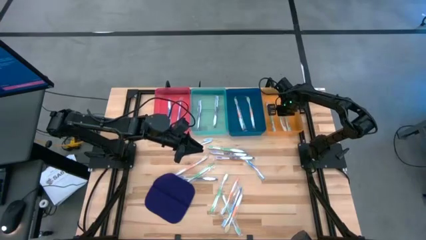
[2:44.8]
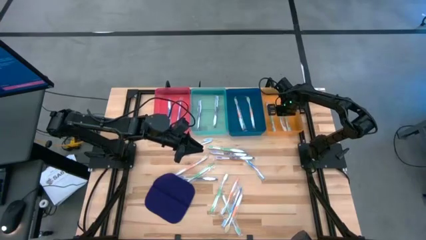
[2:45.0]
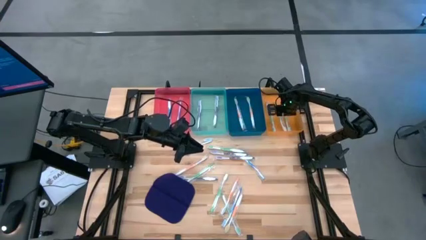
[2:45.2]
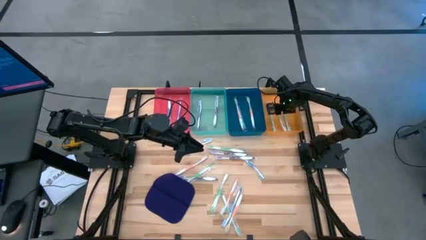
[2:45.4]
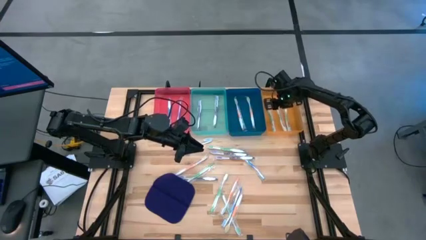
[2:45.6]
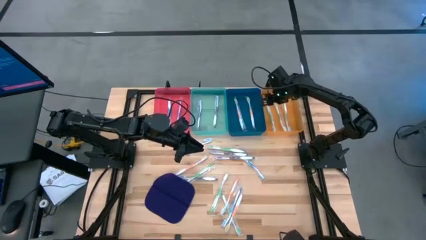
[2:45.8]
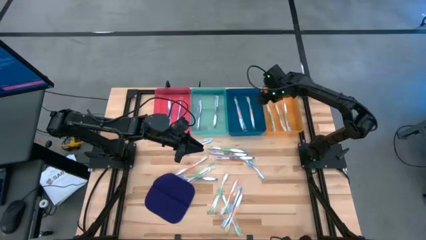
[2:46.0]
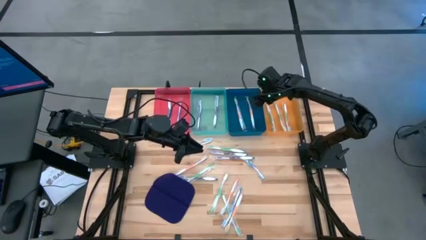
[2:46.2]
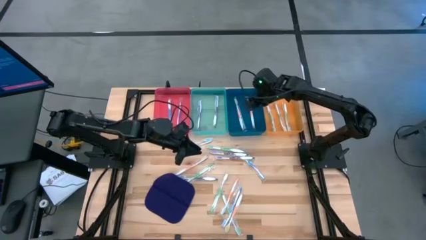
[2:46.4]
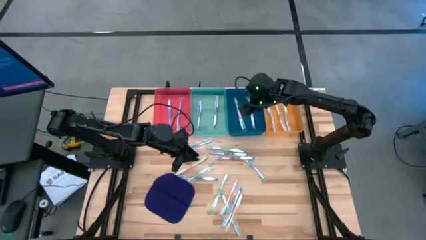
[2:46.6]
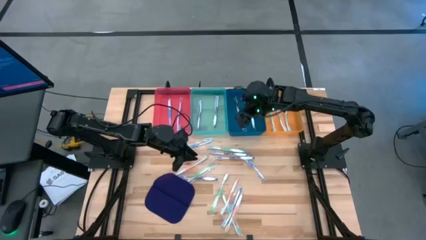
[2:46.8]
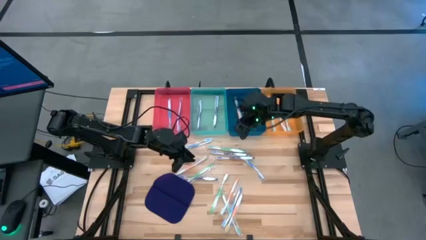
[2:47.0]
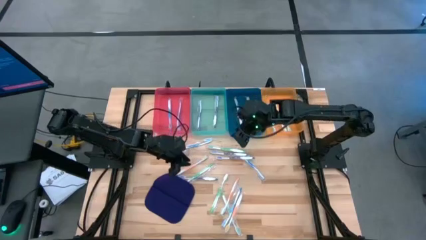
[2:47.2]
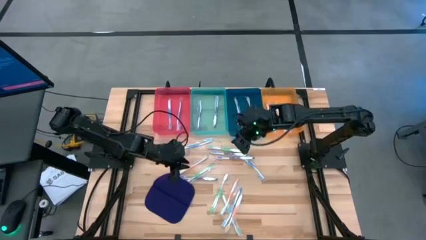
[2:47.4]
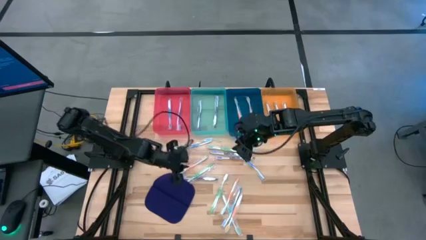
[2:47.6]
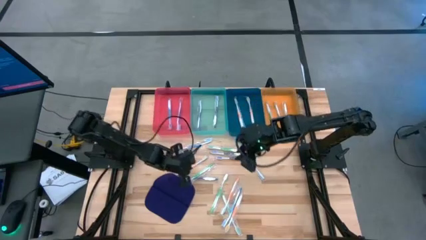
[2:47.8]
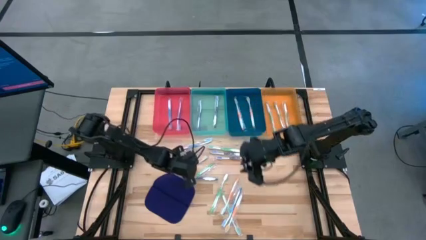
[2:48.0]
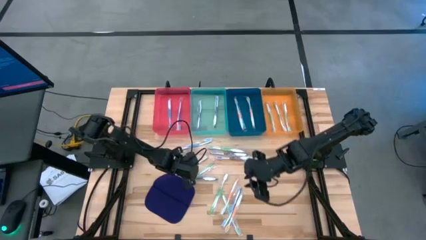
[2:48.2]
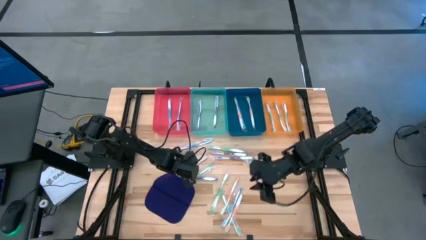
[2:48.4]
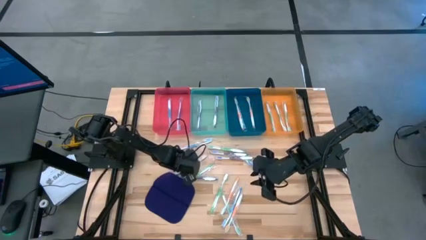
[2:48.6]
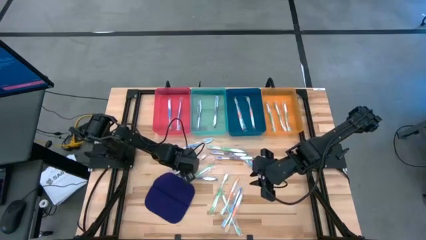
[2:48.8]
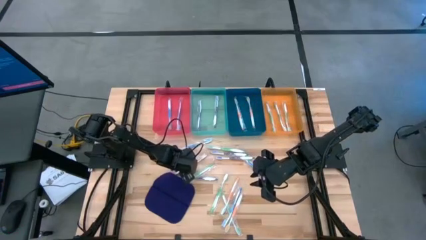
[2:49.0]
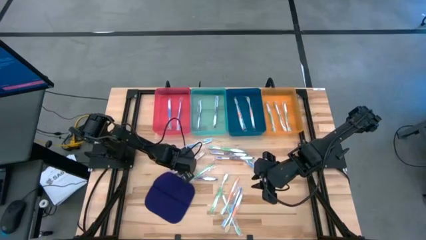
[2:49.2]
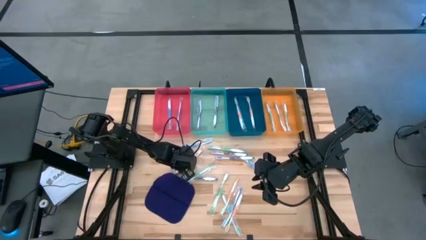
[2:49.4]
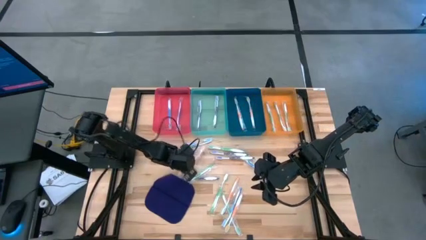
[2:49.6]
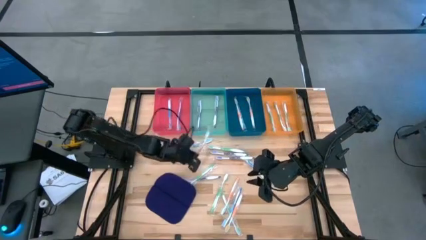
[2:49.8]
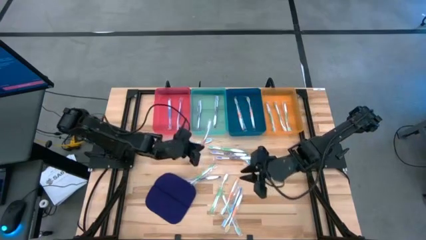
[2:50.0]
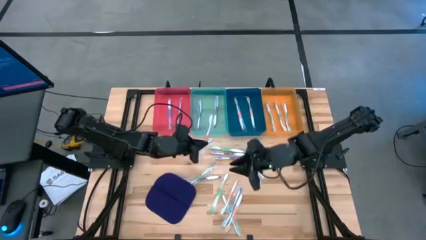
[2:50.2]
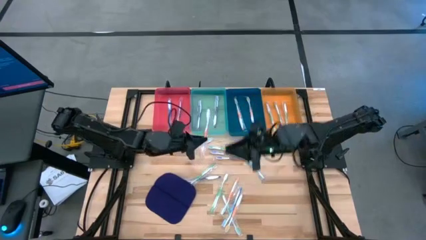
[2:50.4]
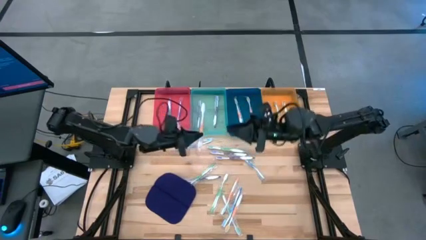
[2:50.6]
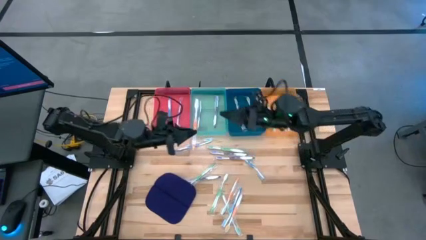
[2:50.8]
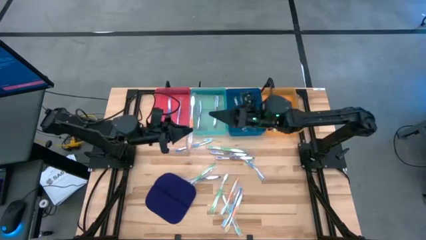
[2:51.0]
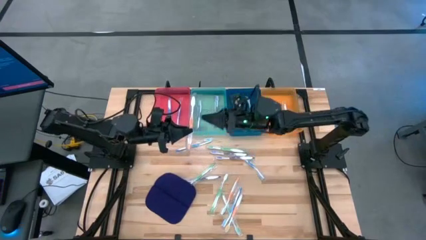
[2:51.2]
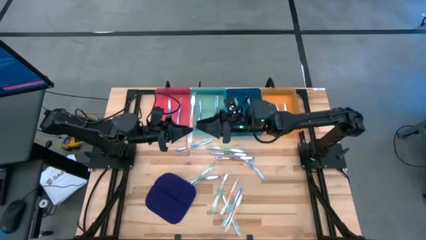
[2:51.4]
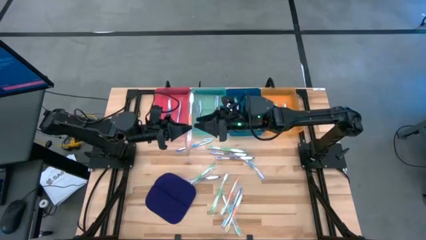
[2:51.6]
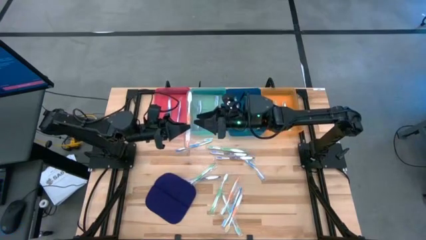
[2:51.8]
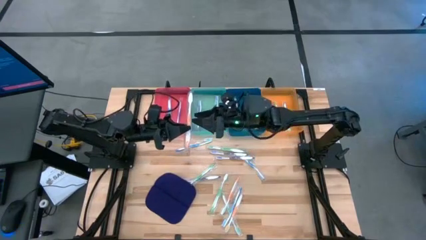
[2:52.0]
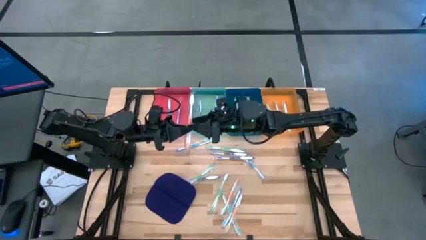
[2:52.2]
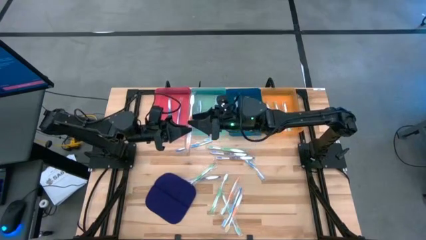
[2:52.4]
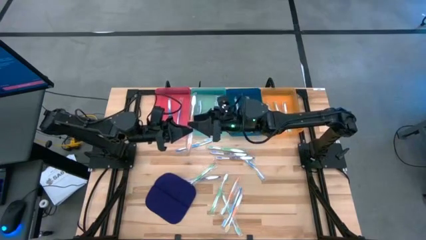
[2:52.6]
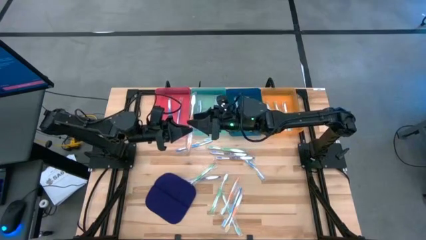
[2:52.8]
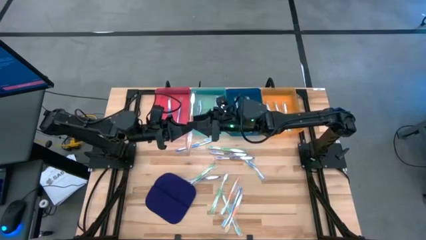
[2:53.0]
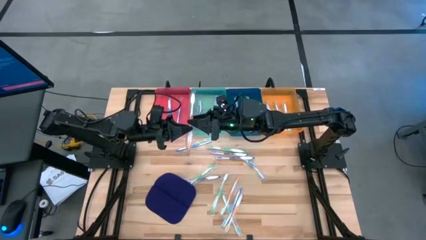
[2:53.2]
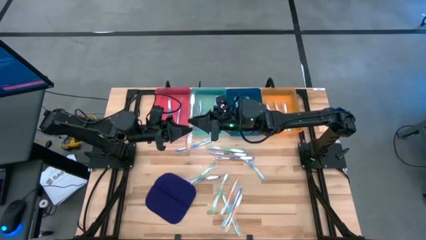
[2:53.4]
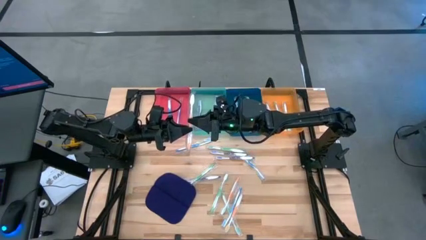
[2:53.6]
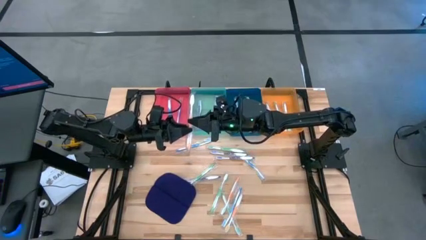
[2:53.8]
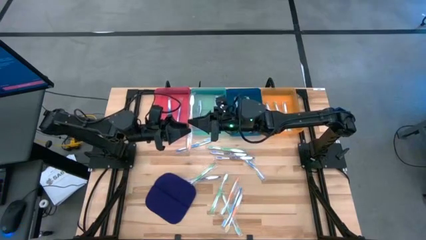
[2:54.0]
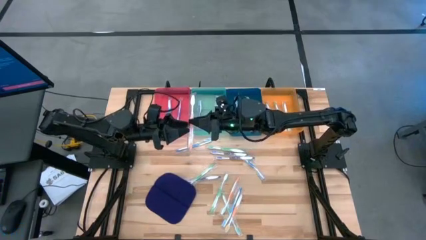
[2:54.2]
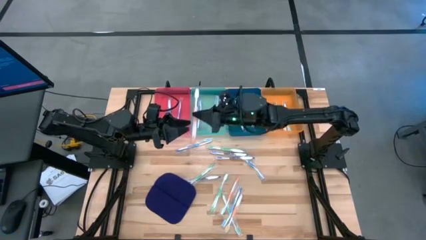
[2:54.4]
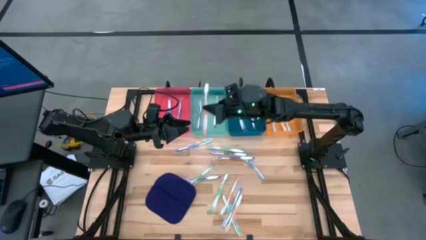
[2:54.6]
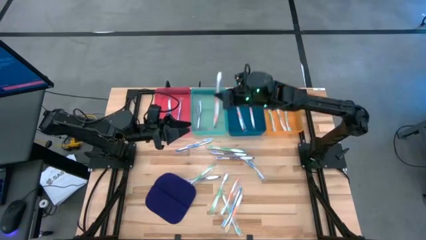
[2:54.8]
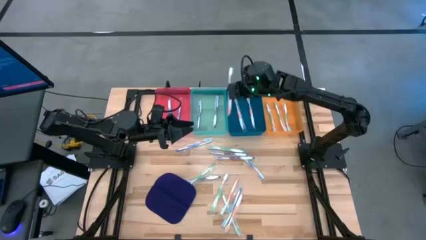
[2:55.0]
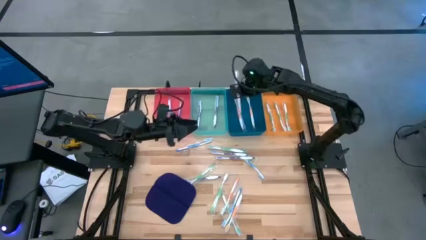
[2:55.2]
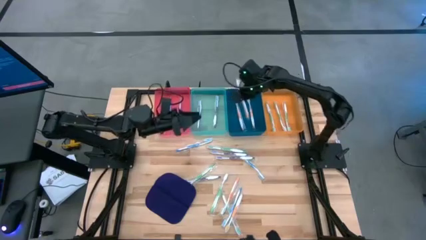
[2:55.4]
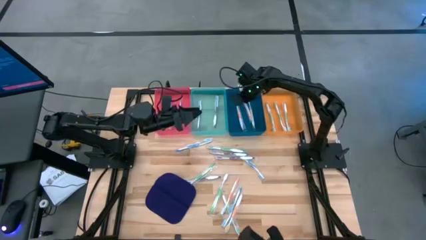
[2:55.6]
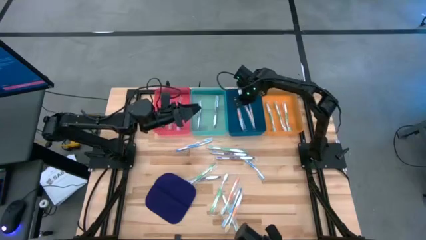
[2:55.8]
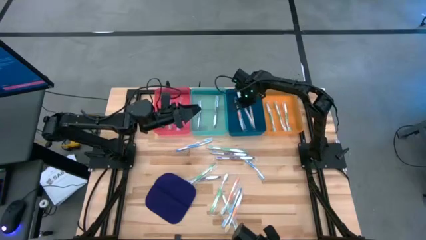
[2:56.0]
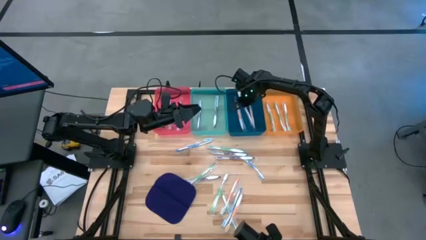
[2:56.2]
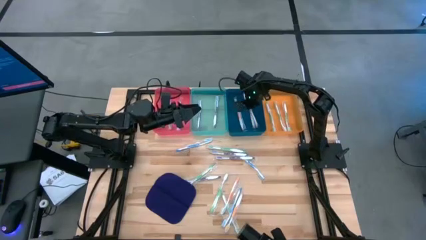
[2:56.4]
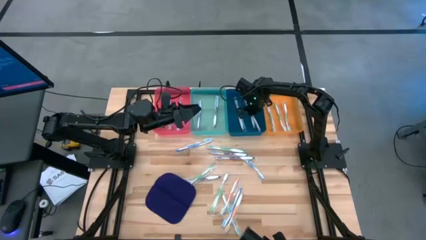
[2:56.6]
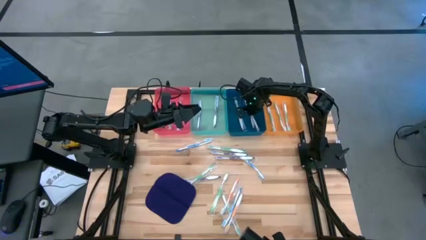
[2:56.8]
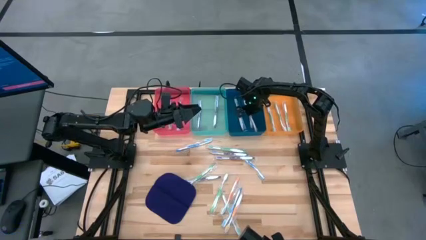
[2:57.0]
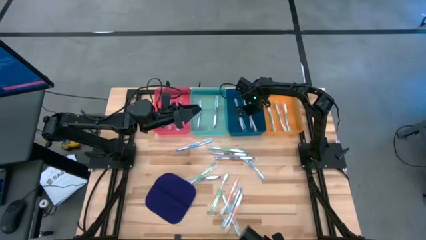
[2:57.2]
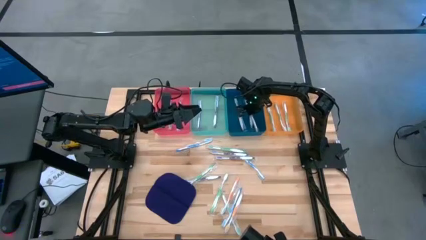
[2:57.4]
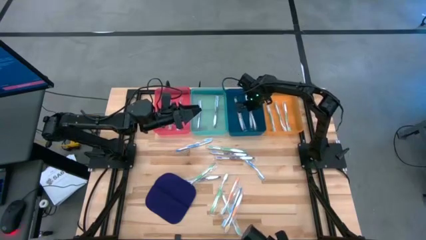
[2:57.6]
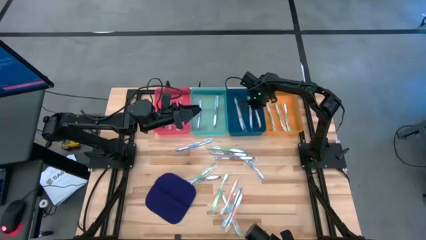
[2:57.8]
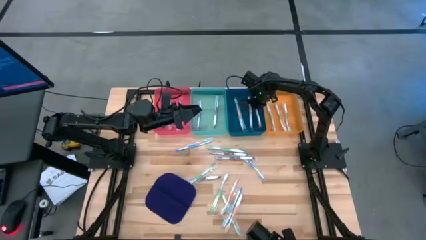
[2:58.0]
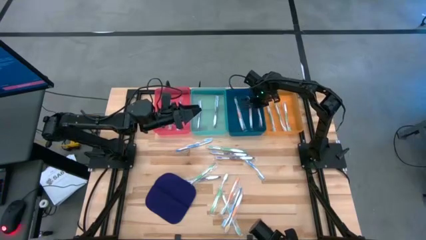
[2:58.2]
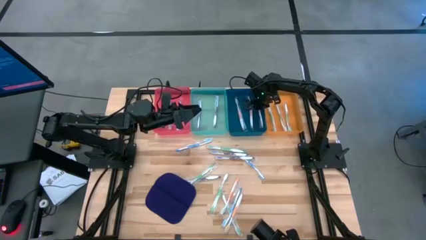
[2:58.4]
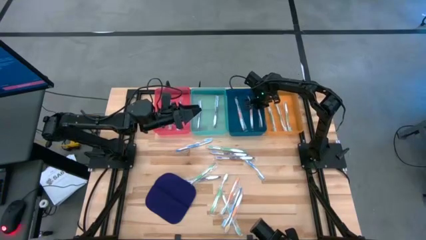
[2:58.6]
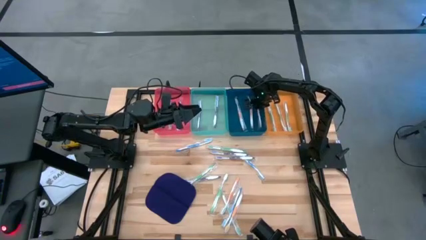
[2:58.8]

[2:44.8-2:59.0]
Task: Pick & Place Toothbrushes
Put the orange toothbrush into the blue bin

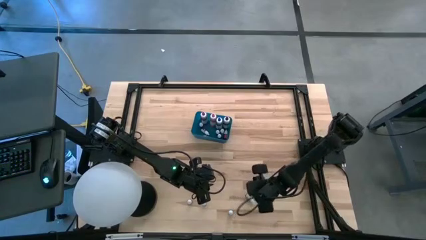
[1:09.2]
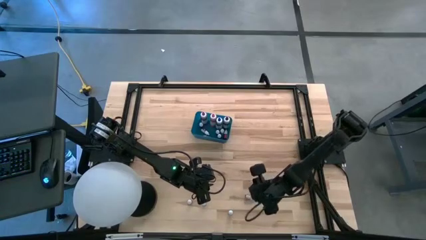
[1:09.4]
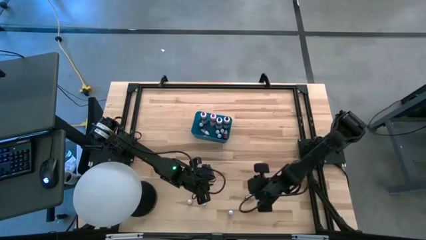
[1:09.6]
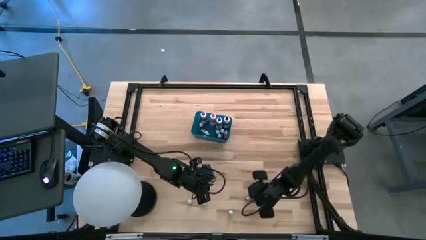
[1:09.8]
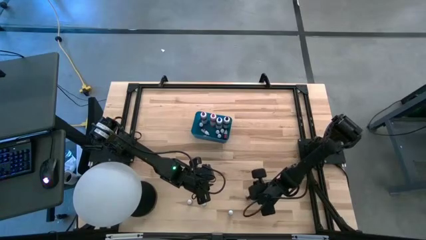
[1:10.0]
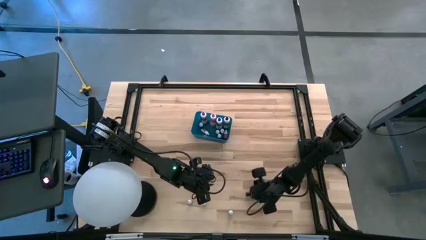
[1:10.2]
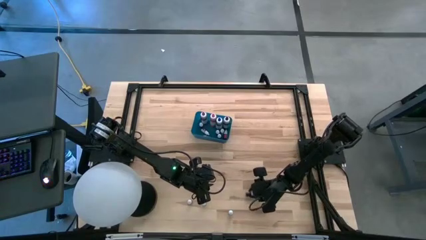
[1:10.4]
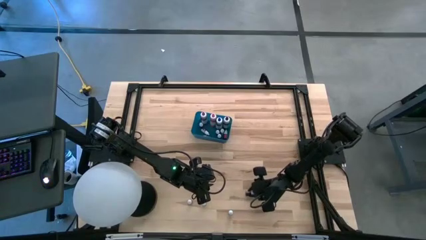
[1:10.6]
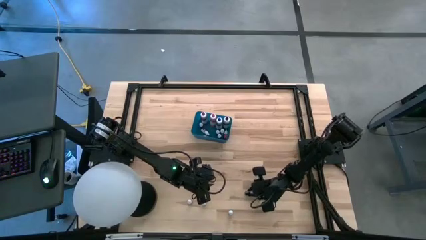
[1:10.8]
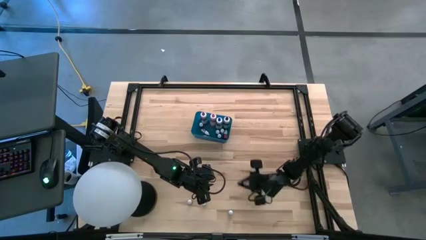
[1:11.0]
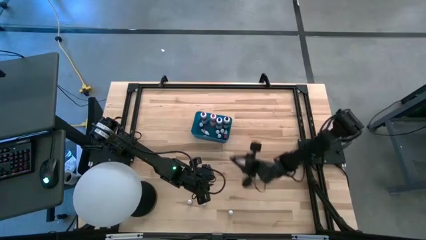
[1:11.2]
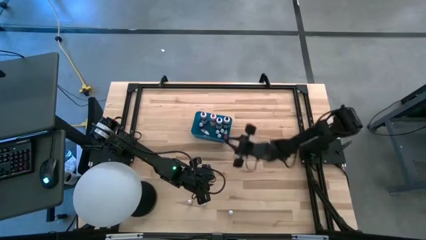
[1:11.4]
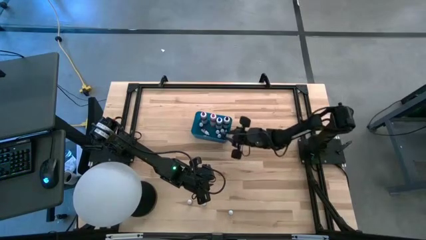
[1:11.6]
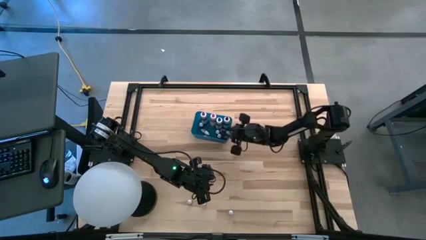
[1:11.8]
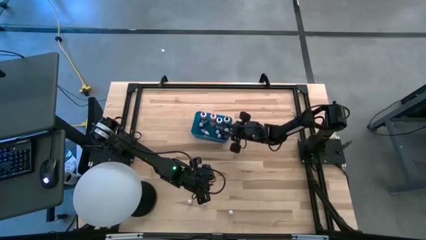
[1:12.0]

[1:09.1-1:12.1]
Task: Pick & Place food coloring
Put the purple food coloring bottle into the blue bin
